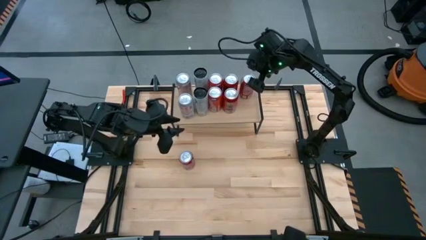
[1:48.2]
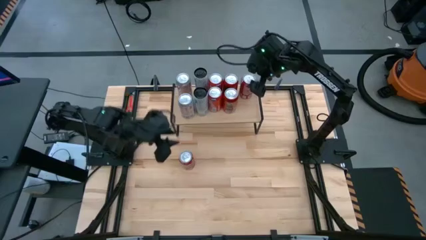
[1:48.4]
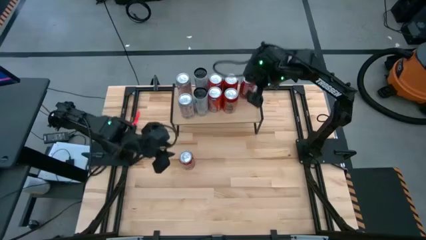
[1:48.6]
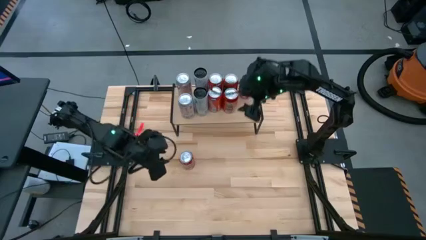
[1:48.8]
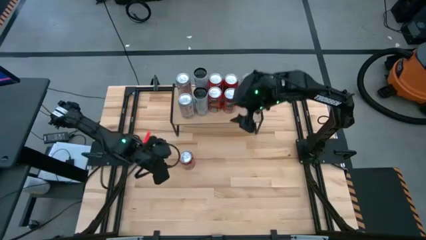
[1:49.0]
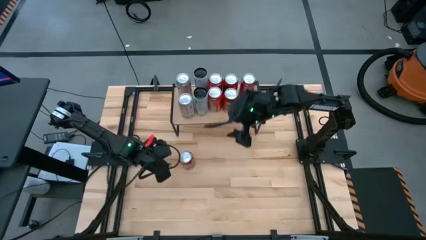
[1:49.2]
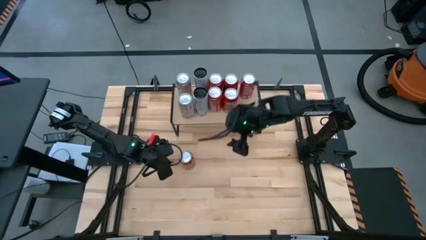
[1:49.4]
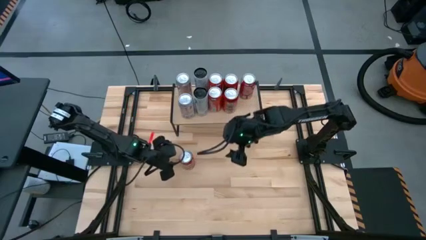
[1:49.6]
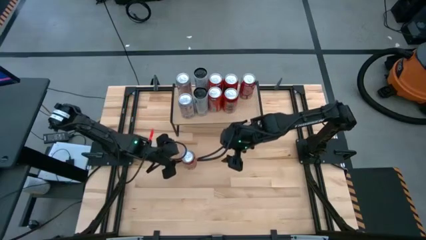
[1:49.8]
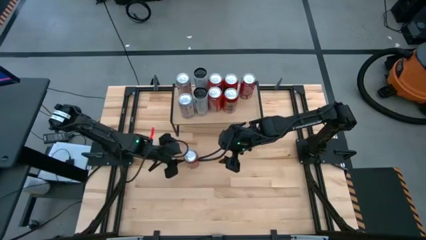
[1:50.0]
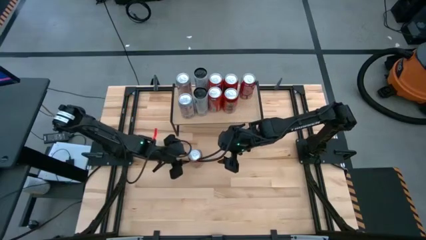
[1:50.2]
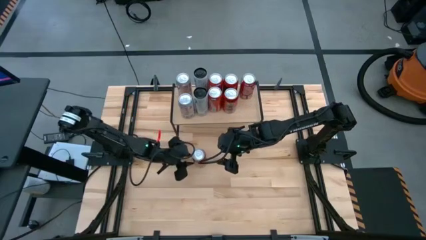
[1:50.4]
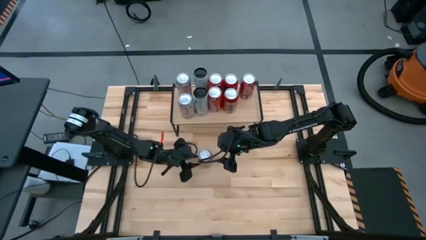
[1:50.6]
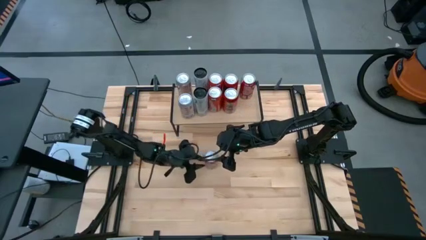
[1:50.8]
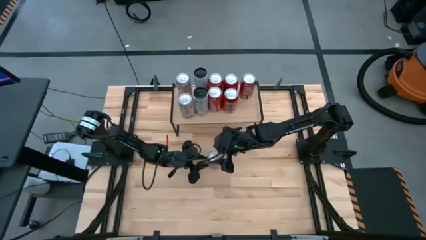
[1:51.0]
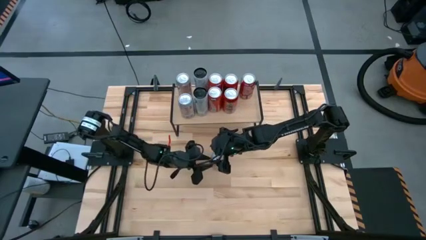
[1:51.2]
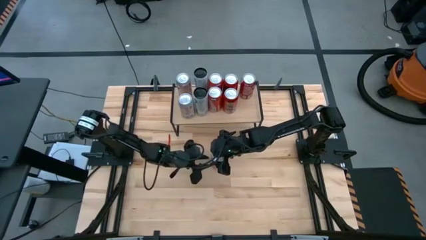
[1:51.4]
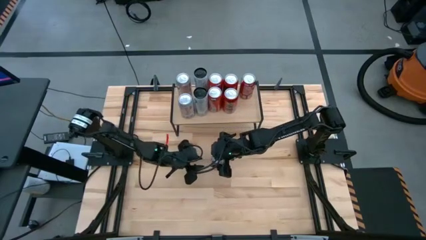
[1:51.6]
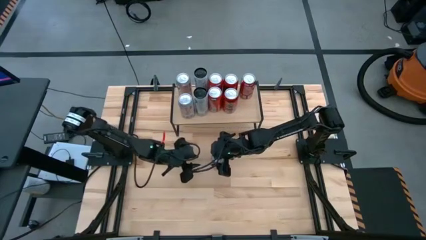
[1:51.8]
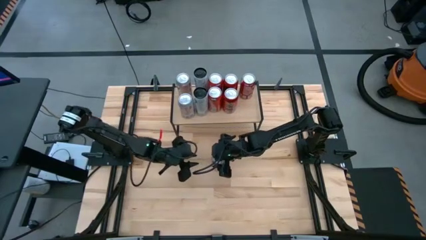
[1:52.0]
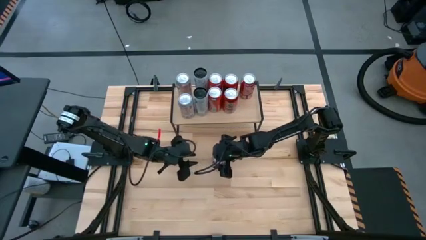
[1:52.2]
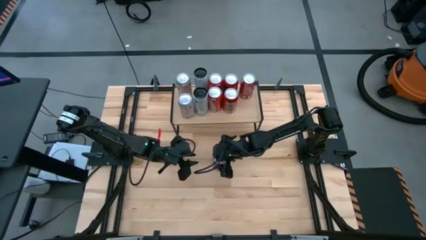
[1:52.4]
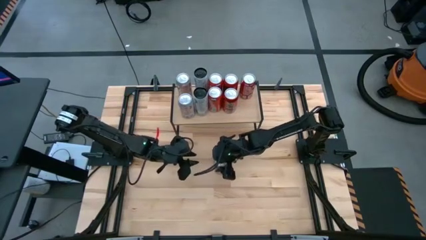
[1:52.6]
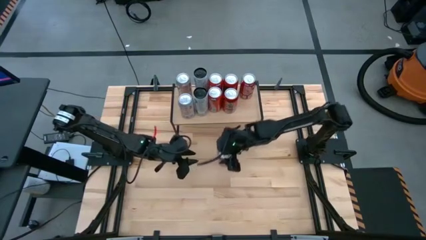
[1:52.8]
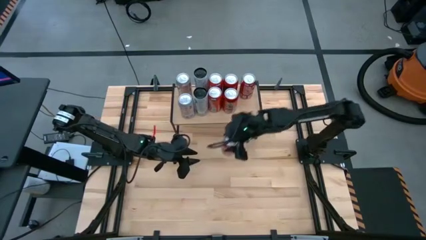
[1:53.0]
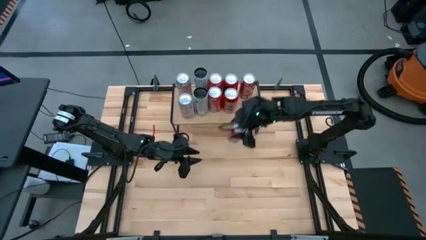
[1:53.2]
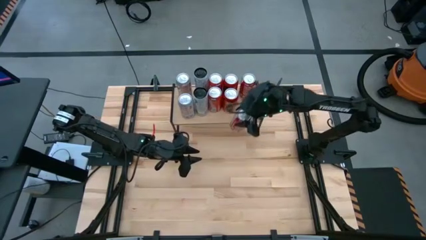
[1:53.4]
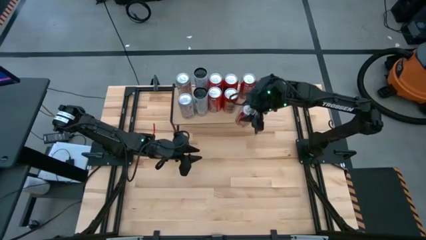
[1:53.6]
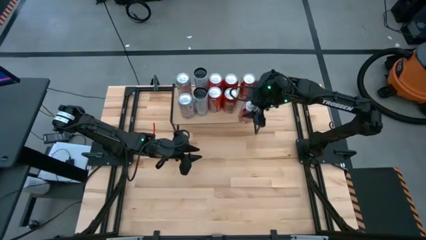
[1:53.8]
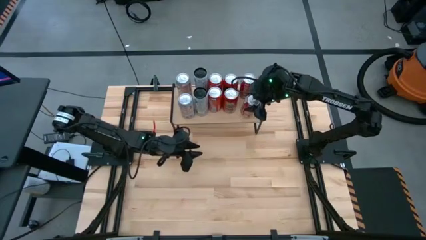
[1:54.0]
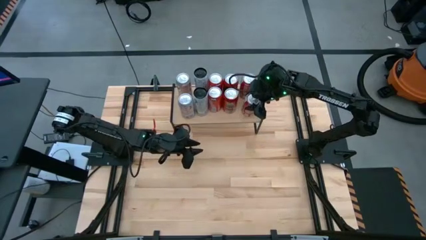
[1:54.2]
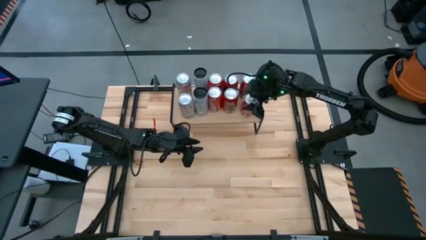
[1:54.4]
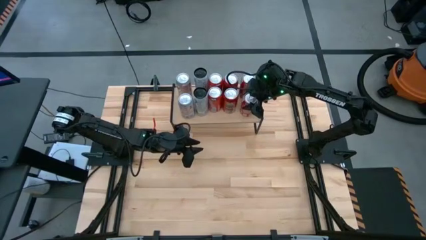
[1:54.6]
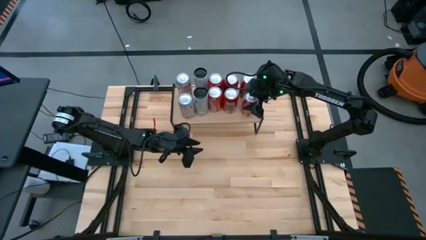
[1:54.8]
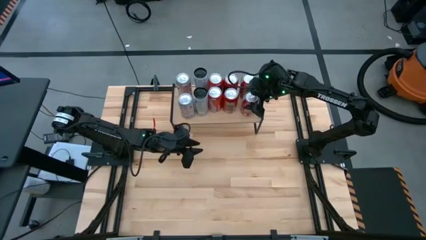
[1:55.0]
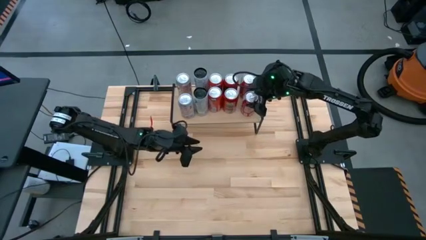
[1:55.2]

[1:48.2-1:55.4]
Task: Place canned beverage on shelf
Put the red and white soda can aligned with the other red and white soda can on the shelf

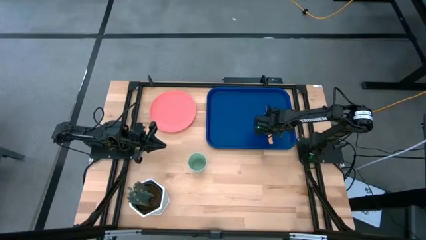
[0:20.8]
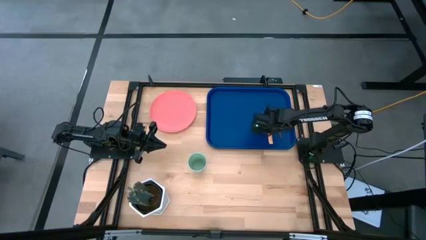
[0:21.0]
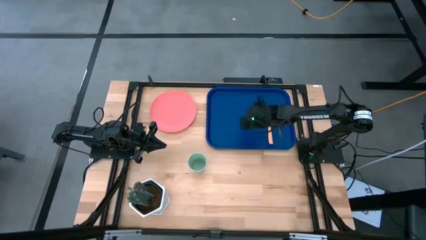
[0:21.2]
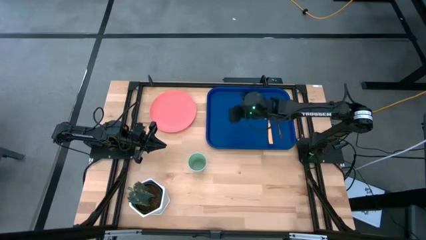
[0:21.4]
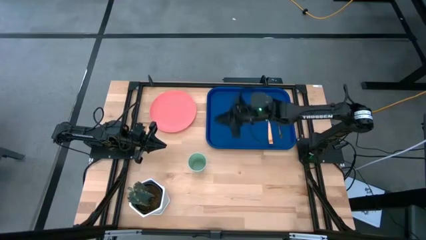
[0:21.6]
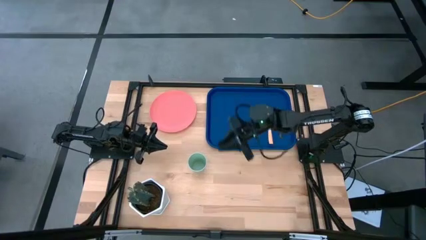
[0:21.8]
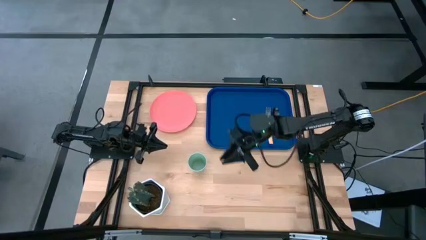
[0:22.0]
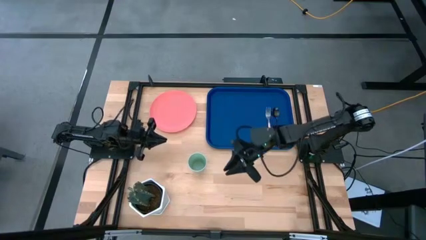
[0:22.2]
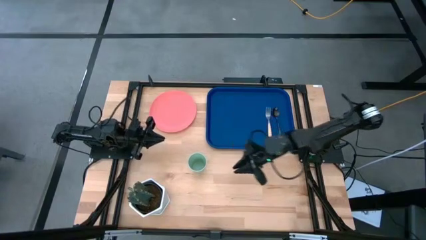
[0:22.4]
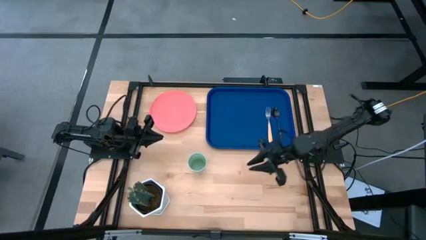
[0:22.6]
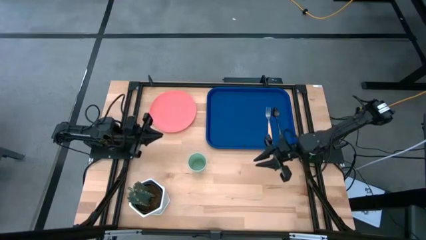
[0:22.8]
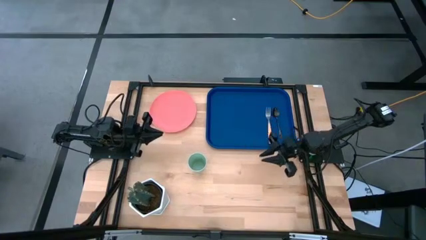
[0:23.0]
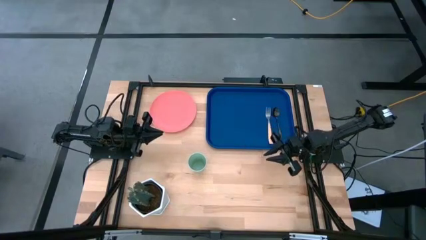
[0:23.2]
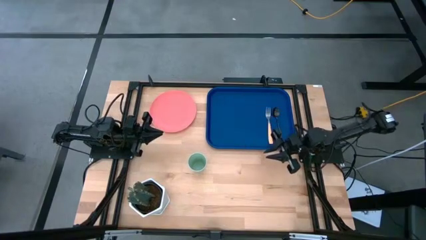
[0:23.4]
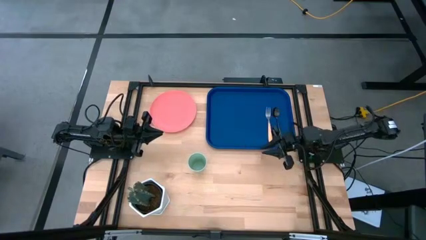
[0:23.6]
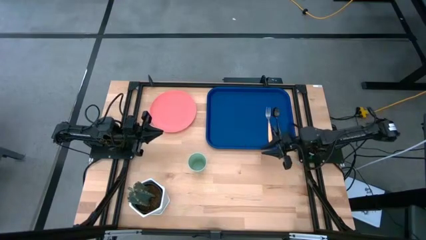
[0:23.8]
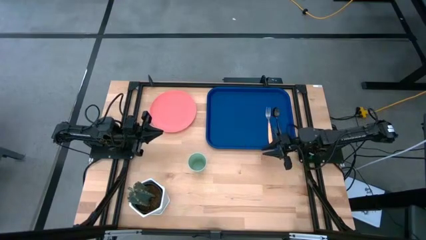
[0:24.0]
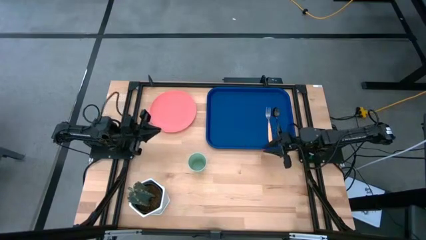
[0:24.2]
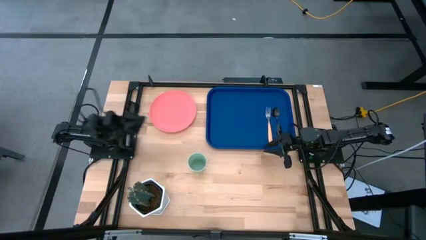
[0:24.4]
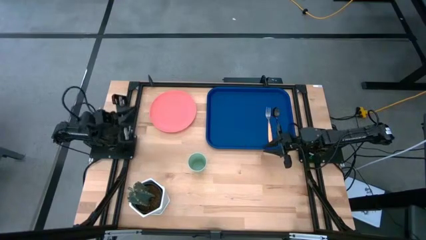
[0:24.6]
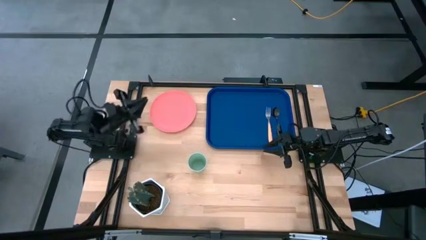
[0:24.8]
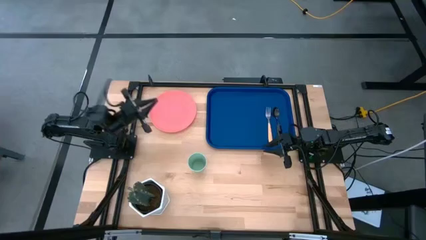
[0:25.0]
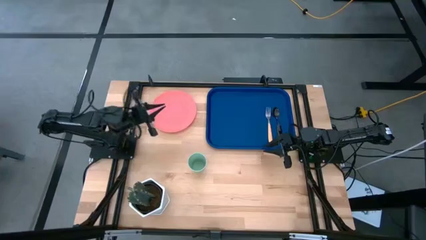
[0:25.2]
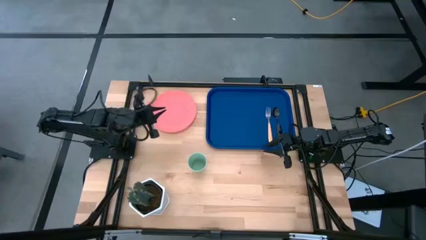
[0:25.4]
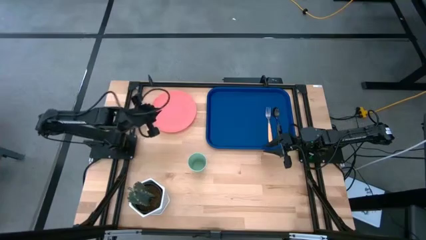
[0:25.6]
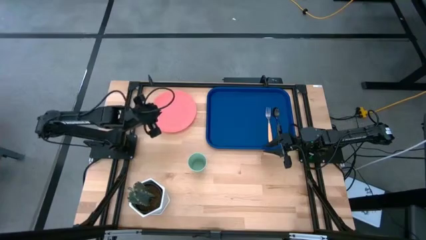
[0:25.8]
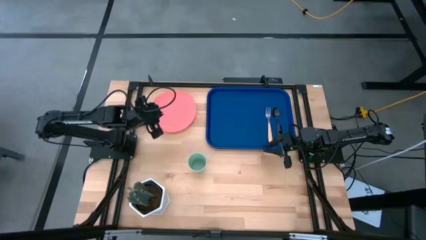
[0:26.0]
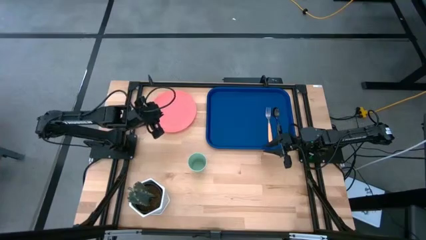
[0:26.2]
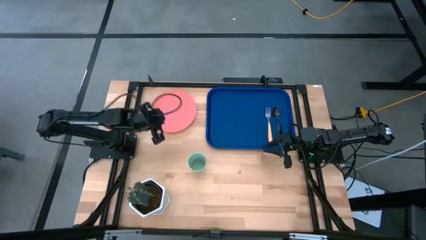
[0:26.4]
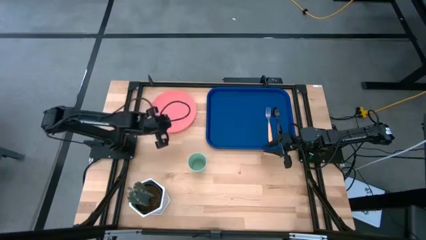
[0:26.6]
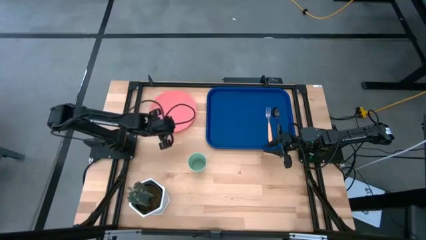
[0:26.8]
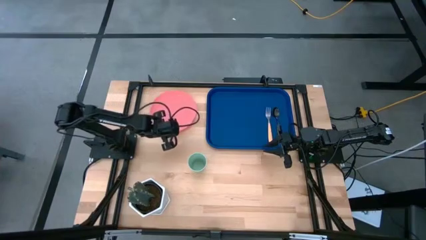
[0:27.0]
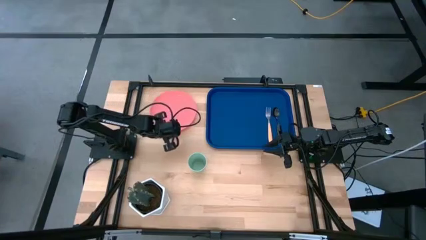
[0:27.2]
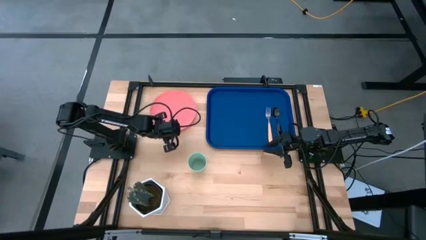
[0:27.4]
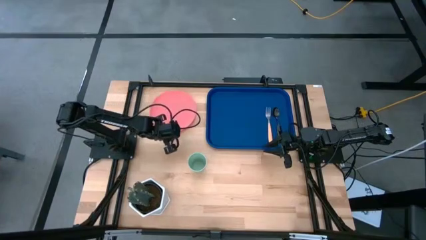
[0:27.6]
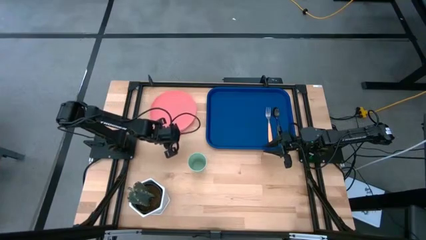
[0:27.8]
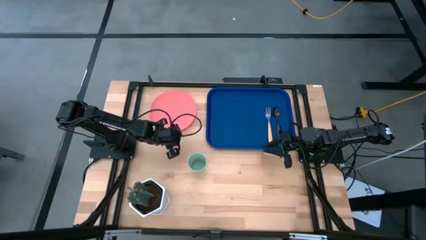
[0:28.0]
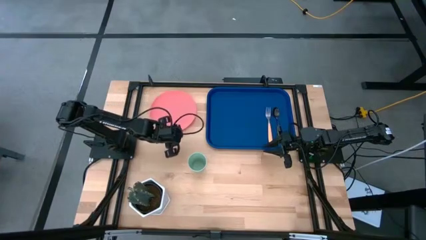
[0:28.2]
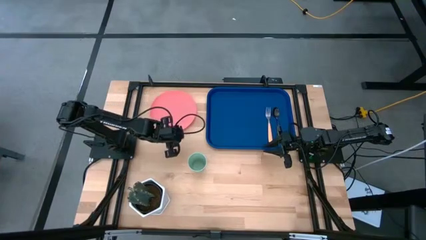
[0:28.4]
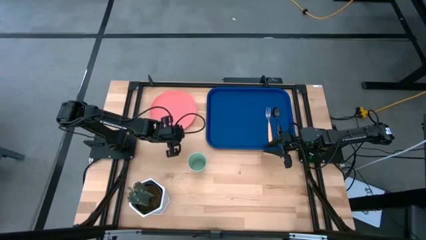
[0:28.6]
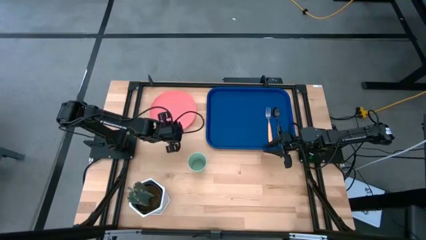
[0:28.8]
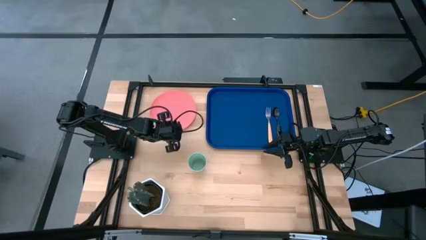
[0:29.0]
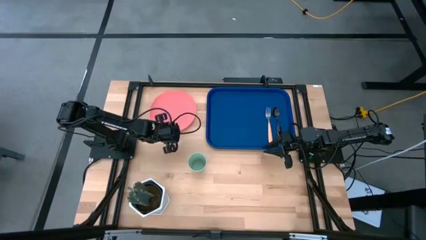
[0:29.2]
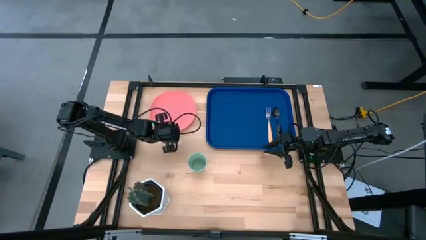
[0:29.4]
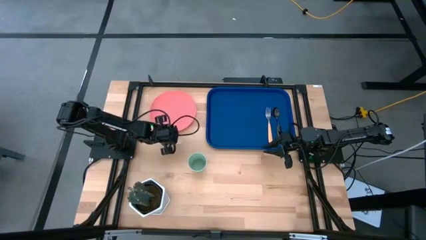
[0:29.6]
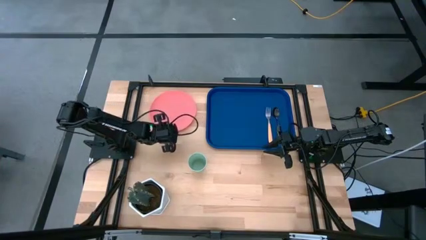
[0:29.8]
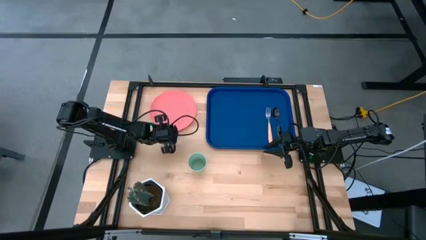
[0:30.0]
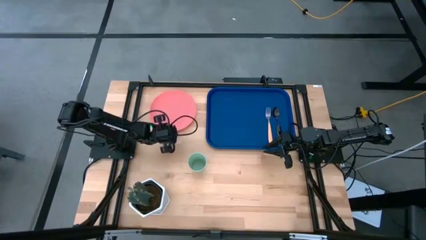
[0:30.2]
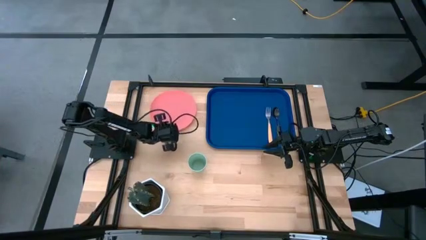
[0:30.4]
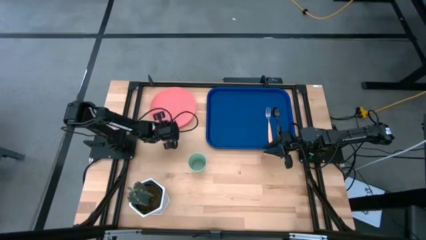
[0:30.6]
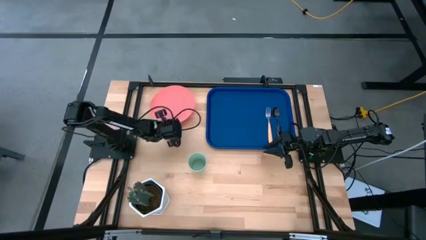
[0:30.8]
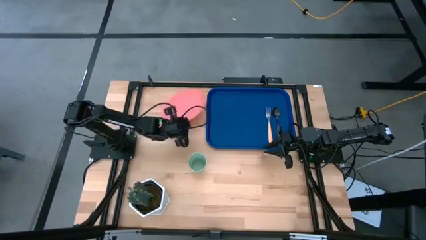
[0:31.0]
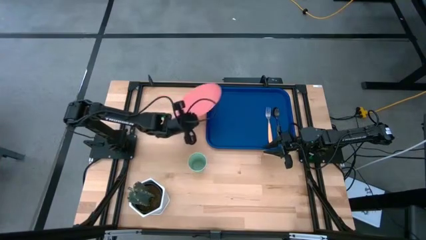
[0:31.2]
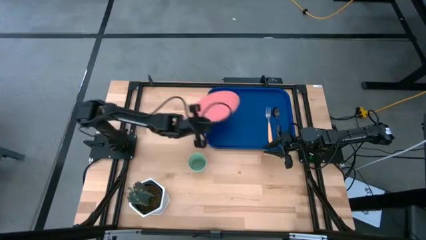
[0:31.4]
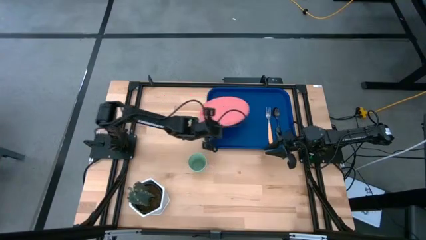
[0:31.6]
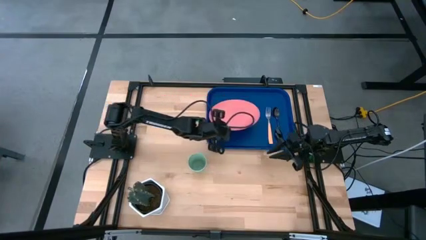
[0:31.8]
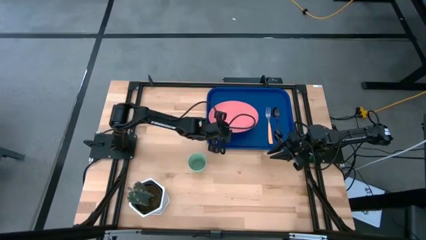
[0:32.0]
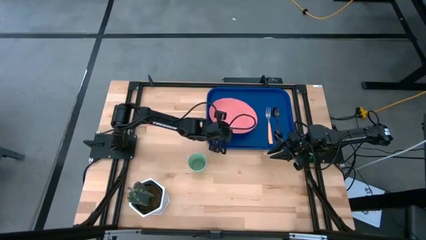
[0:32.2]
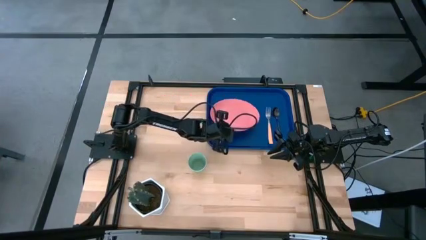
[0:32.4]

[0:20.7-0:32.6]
Task: Pick and place plate/cup/fork/spoon on tray
Put the pink plate on the dark blue tray to the left side of the light orange fork
